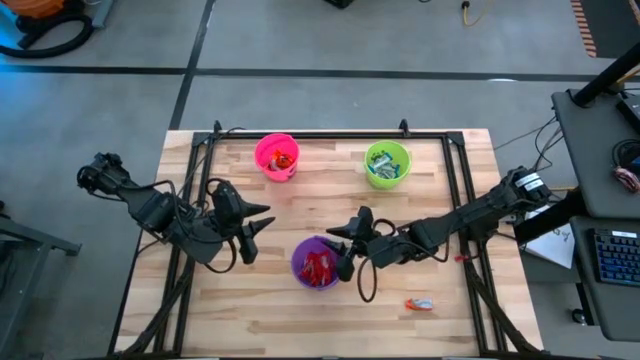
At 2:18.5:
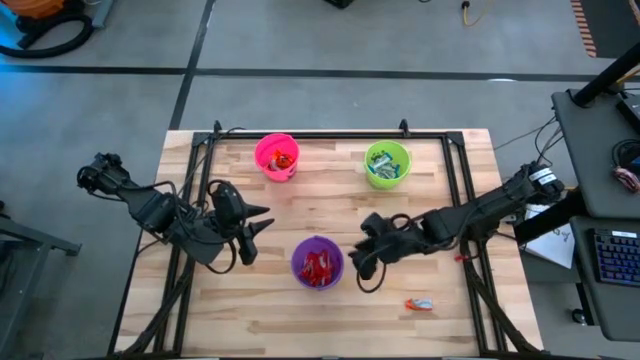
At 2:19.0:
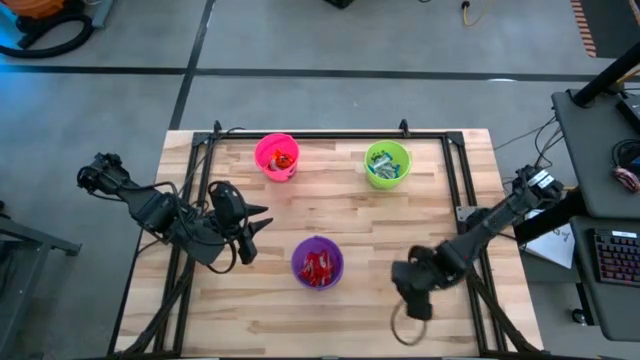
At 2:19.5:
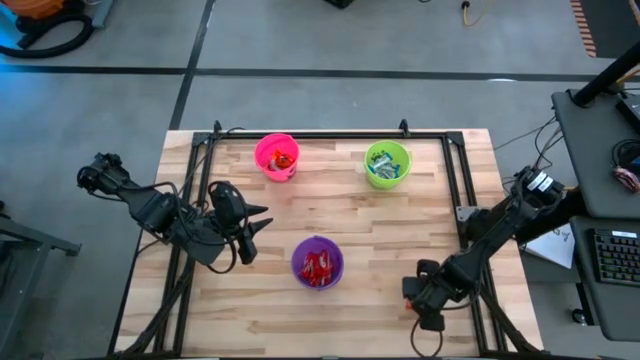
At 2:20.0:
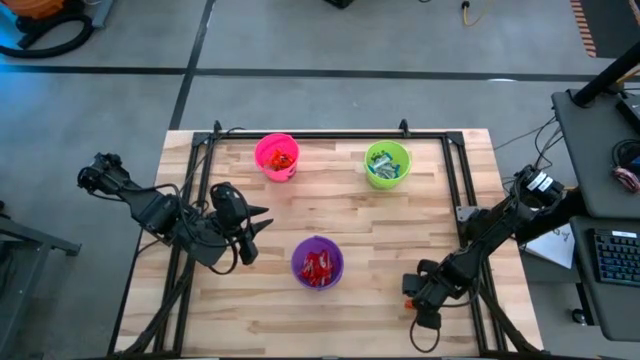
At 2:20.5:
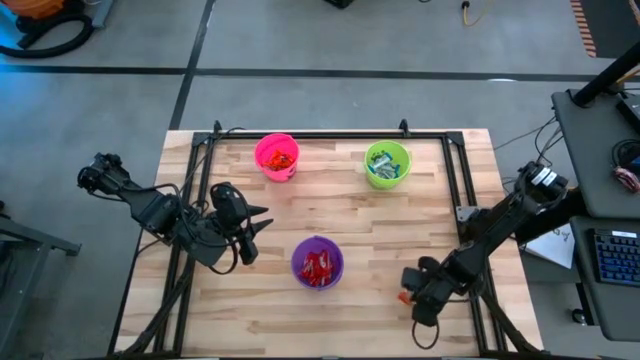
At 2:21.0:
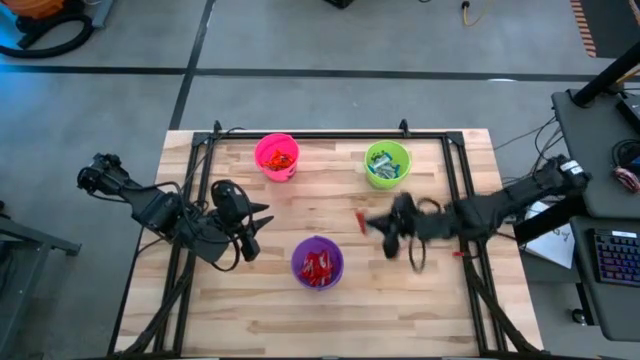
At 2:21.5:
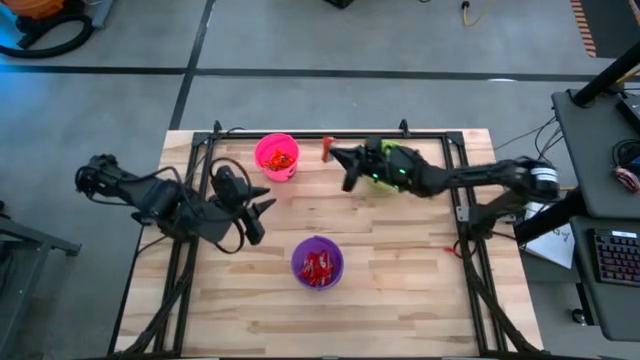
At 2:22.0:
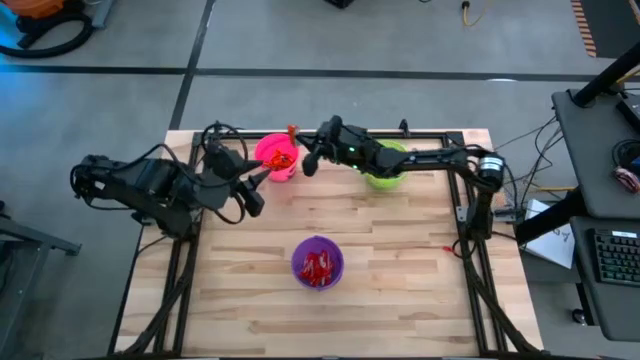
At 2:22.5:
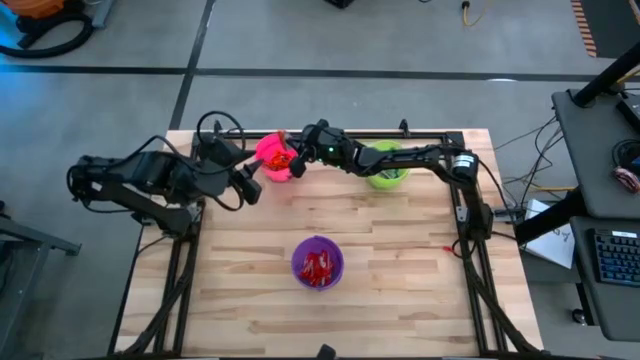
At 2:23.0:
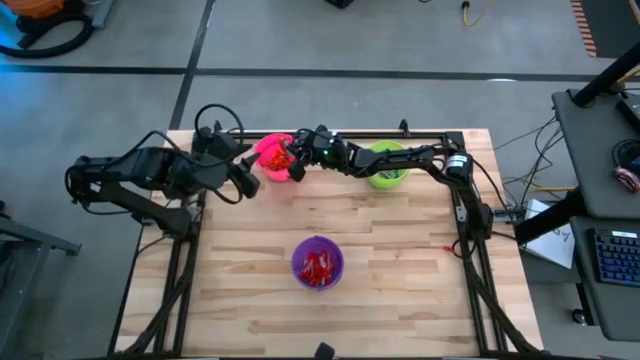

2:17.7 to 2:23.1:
Task: Sort candy
Put the orange chocolate into the pink bucket

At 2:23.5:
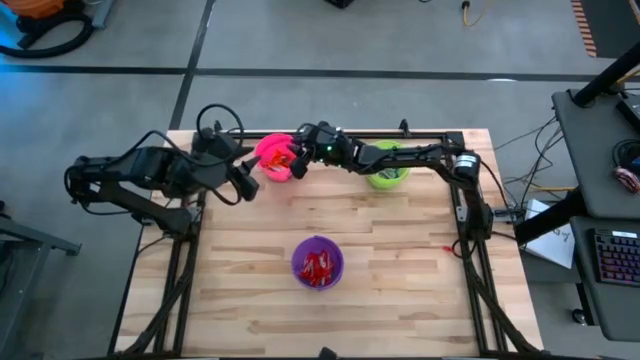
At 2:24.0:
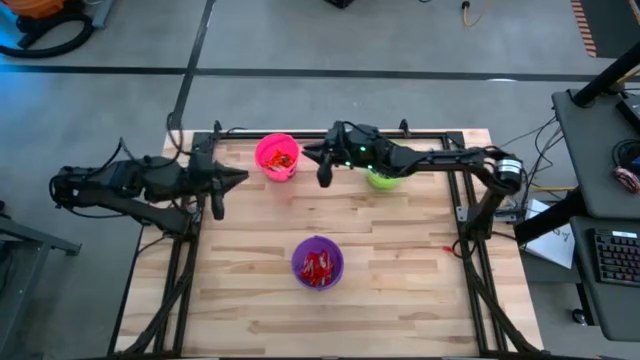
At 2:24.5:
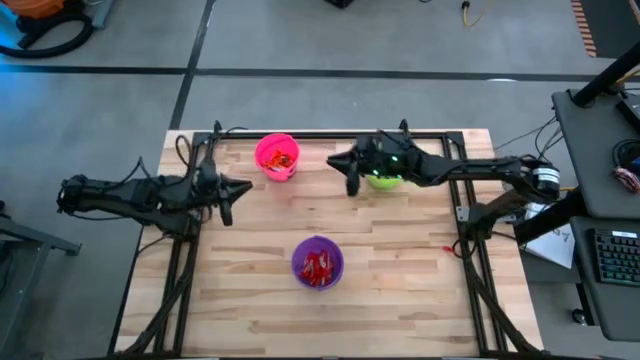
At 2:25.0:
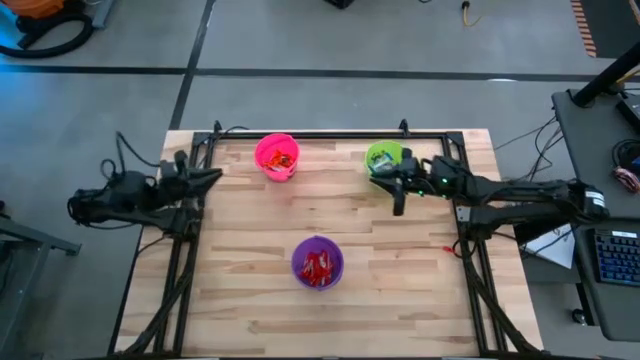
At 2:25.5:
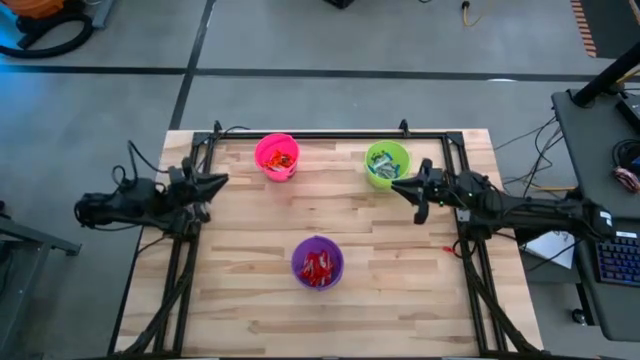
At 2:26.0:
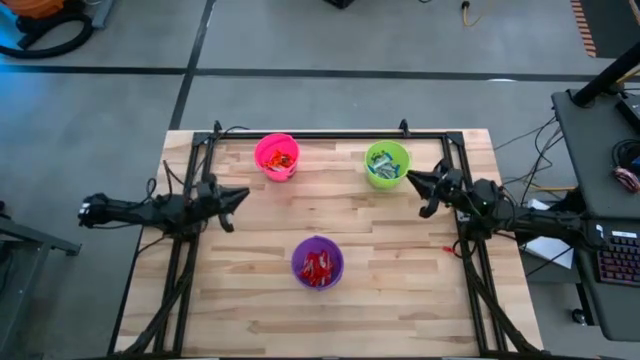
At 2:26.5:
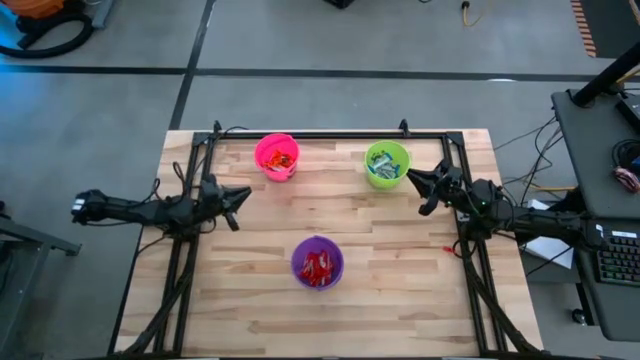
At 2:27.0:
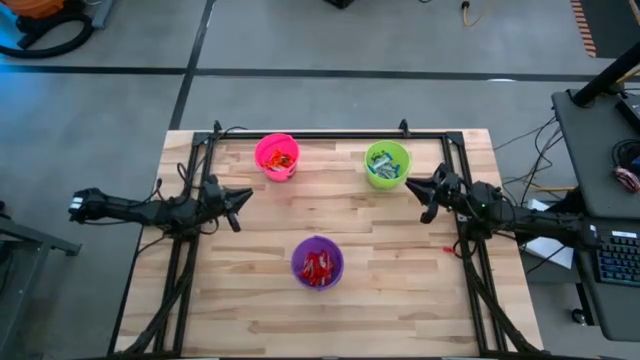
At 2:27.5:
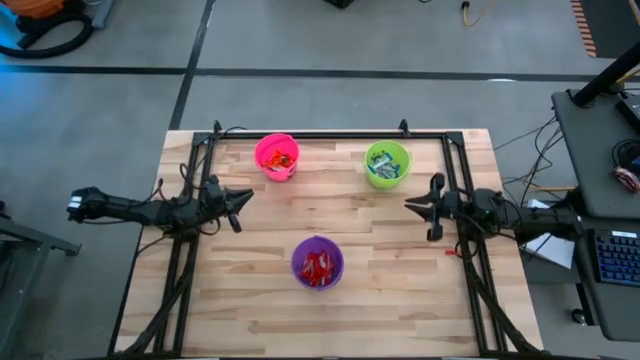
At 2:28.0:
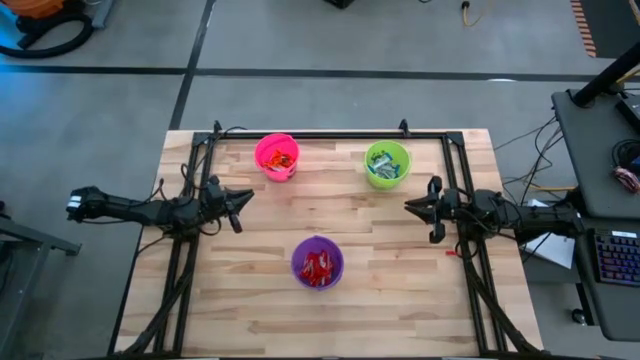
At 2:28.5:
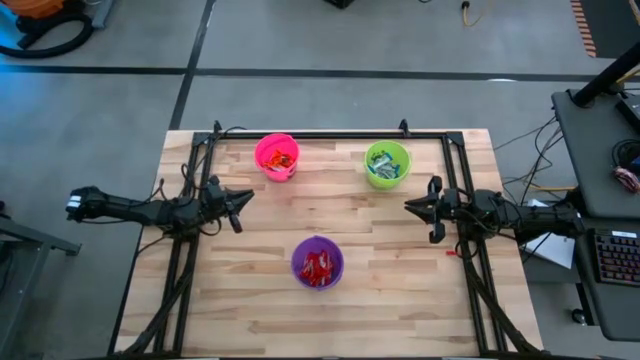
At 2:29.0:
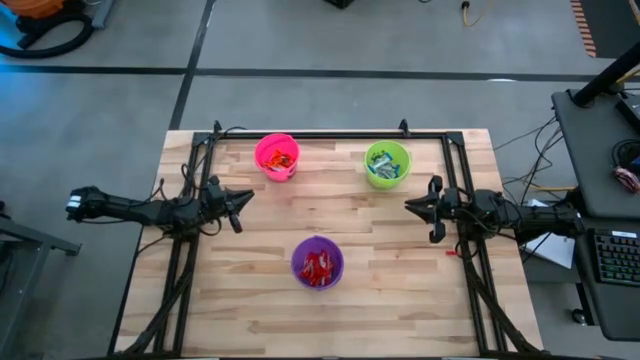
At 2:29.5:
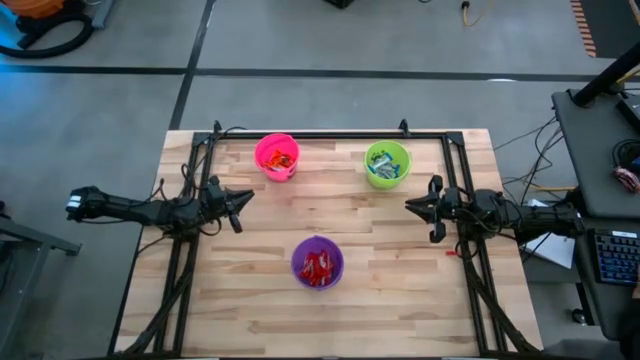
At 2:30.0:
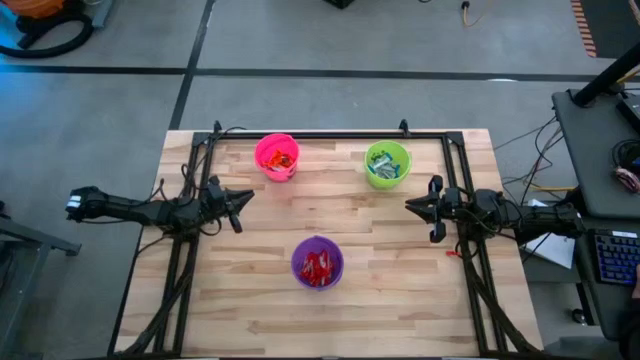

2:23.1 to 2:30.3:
Return to Home Position

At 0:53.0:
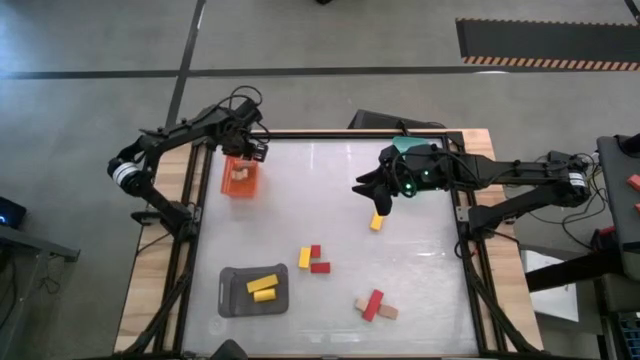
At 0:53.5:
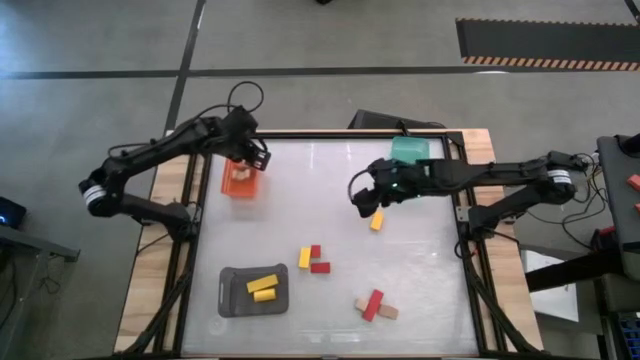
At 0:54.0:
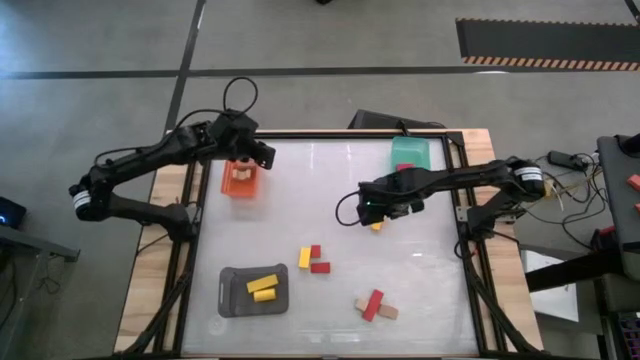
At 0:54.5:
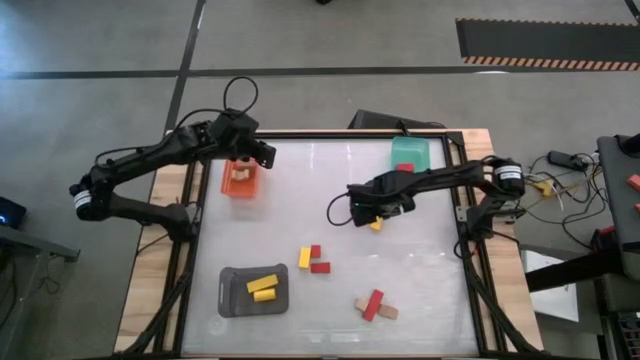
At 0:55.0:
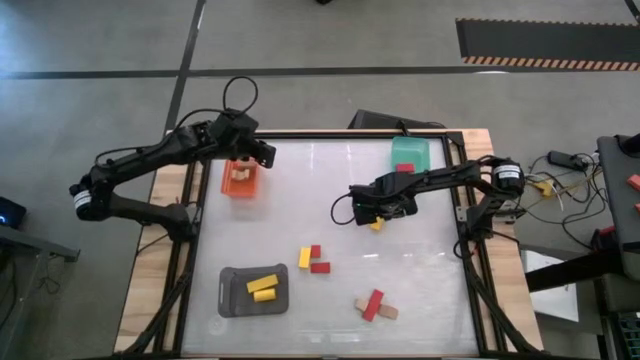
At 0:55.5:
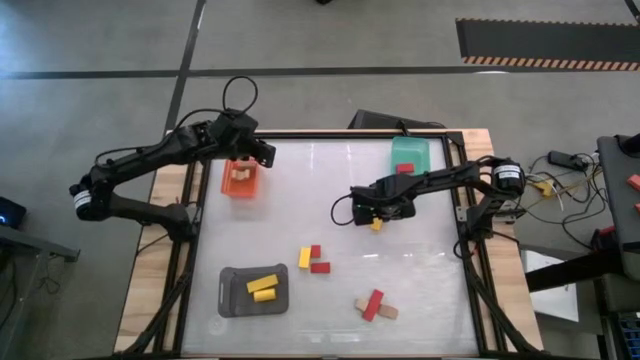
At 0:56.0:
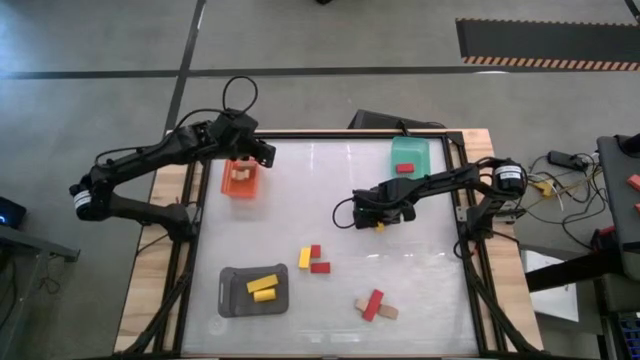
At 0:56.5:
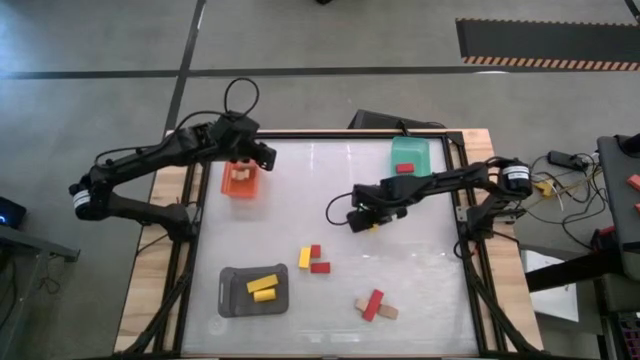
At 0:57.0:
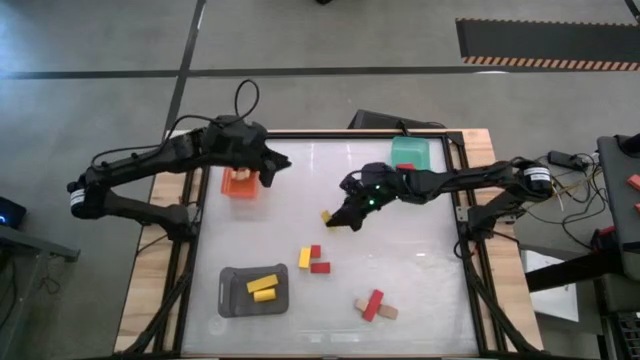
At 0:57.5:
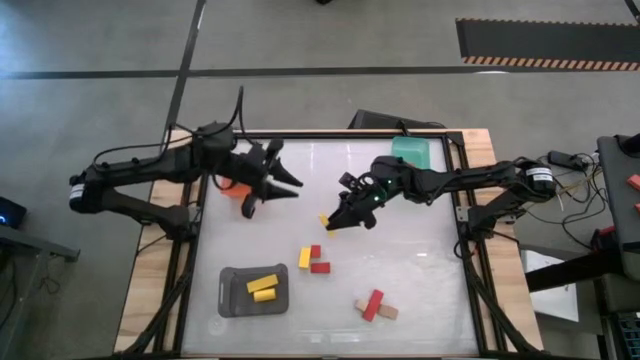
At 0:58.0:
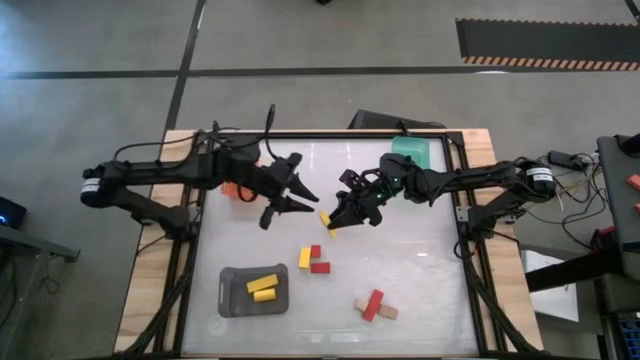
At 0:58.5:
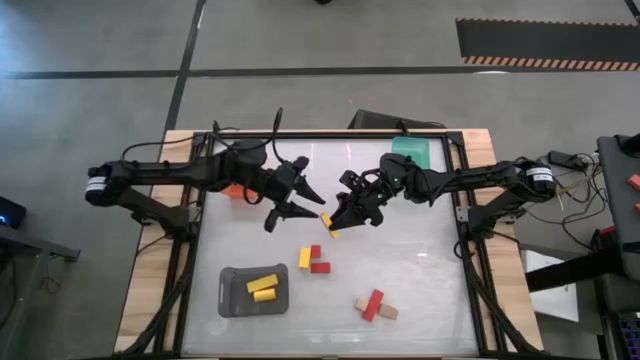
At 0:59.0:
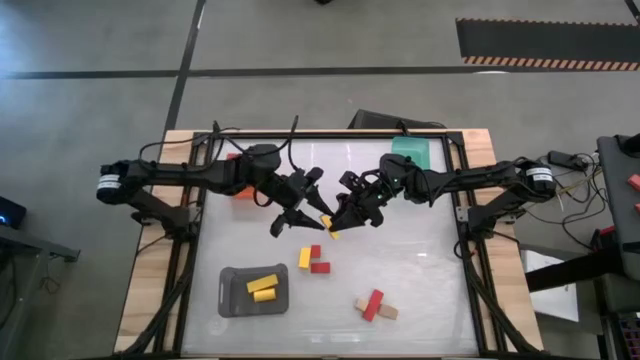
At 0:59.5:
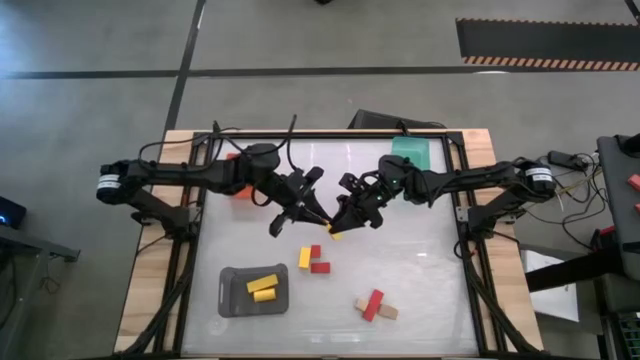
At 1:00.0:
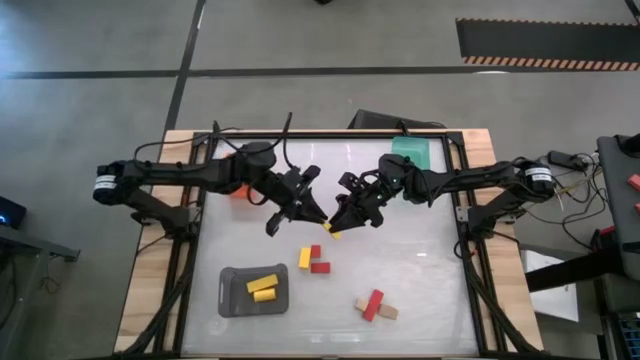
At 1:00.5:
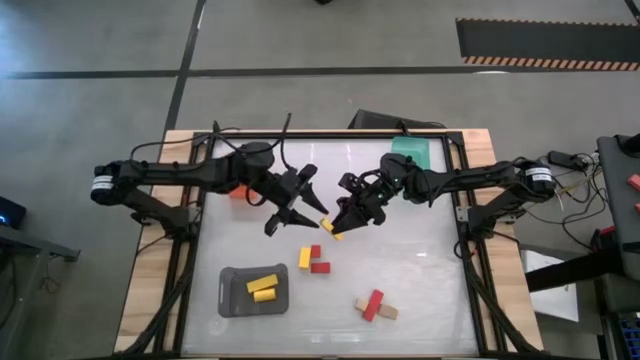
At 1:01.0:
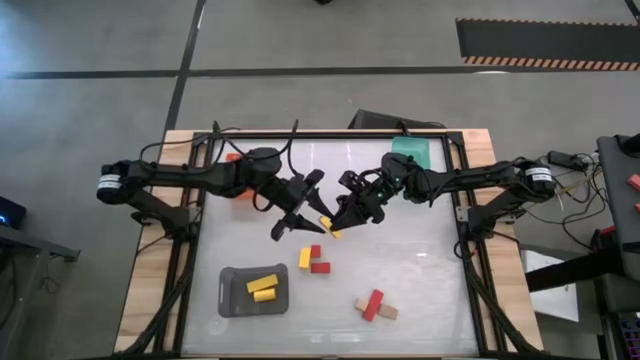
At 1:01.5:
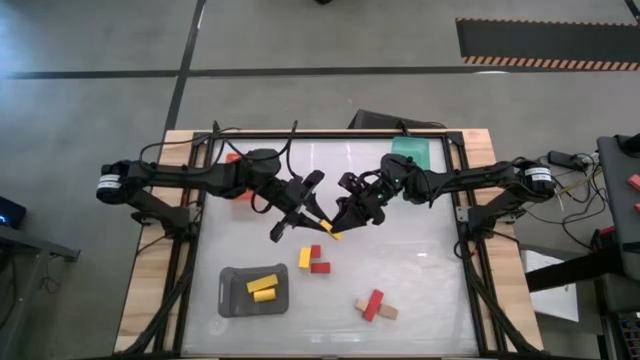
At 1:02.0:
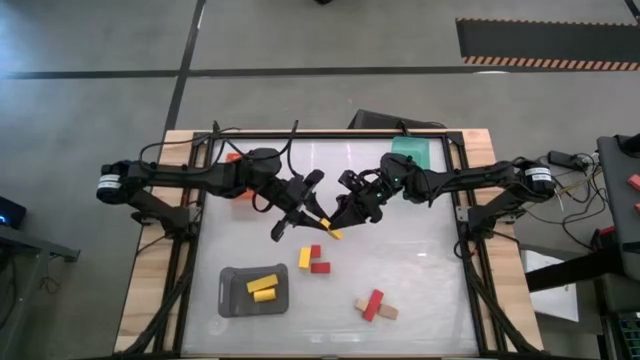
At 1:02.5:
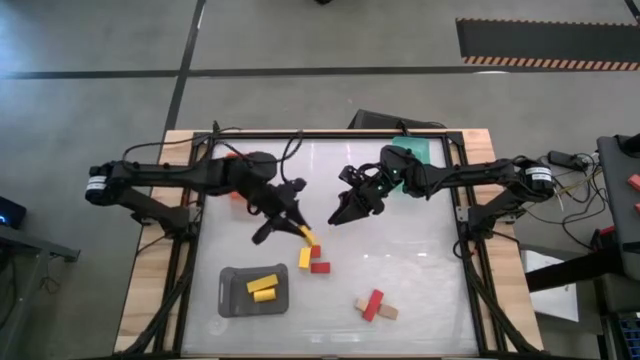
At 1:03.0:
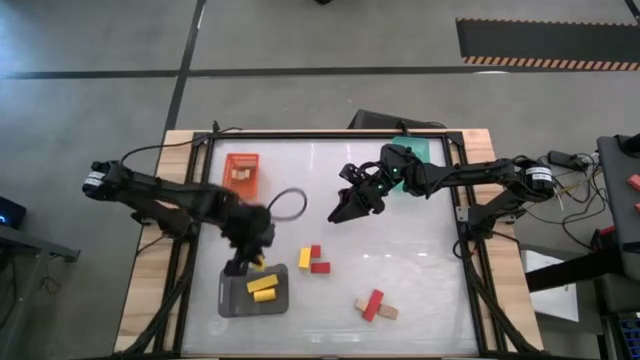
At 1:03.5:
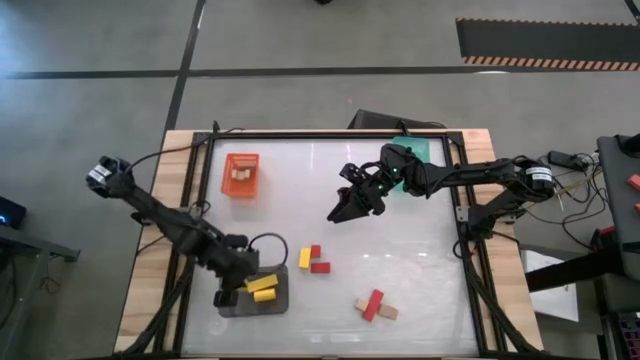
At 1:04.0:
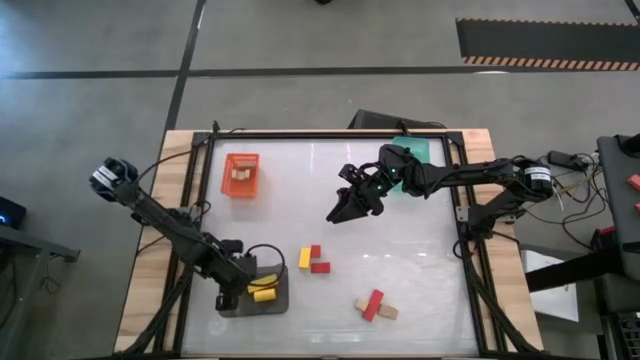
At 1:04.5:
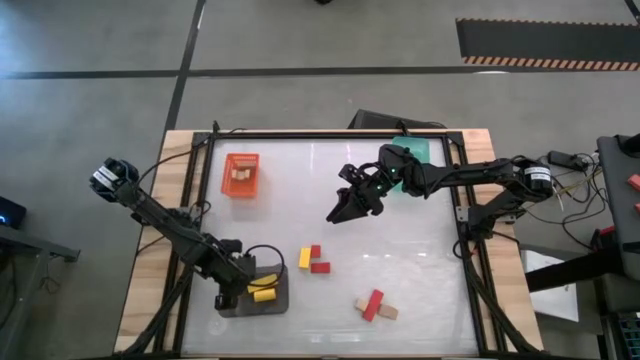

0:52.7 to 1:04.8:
Task: Sort & place blocks by color
Put the yellow block into the black bin
